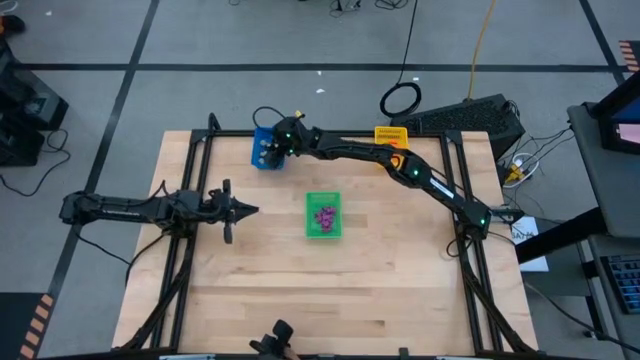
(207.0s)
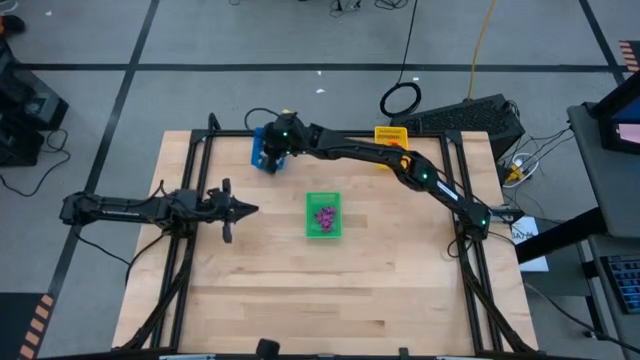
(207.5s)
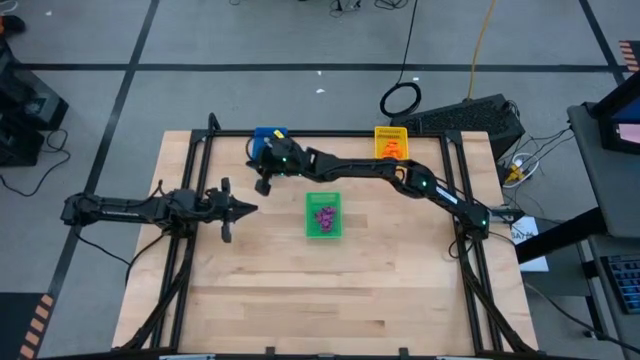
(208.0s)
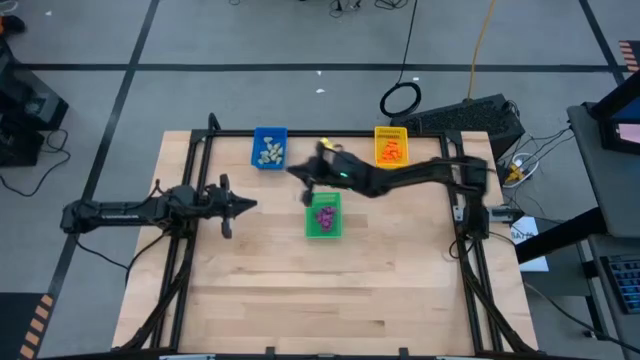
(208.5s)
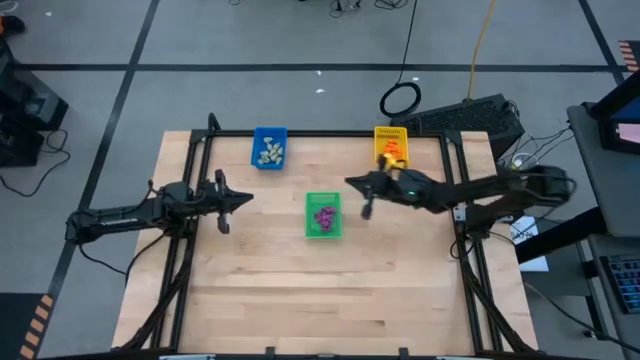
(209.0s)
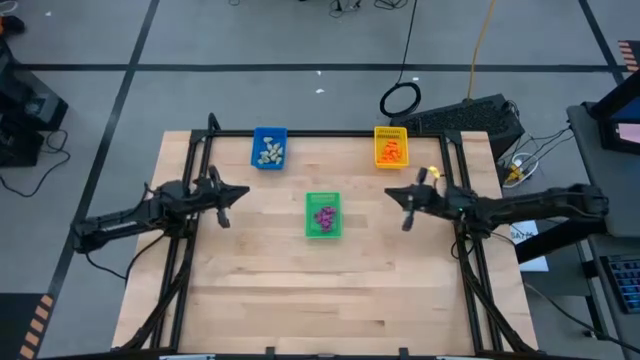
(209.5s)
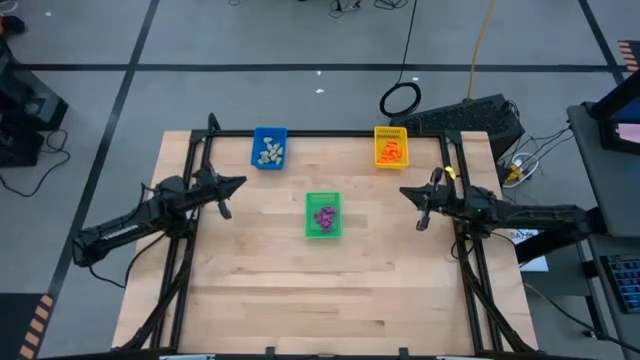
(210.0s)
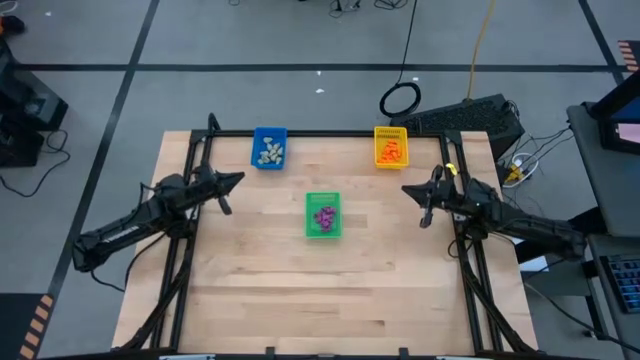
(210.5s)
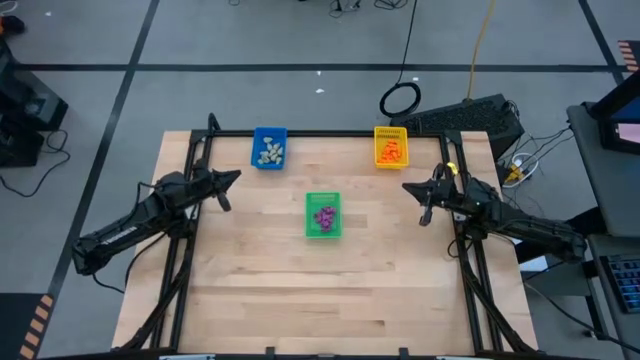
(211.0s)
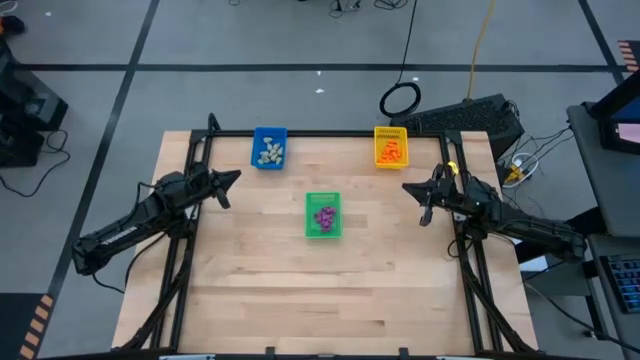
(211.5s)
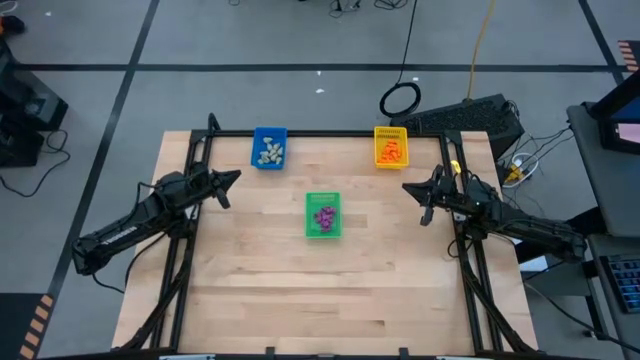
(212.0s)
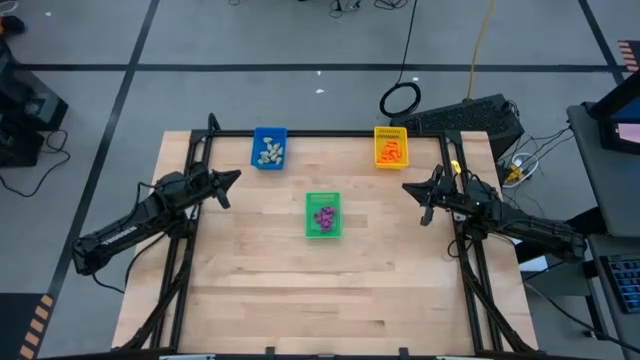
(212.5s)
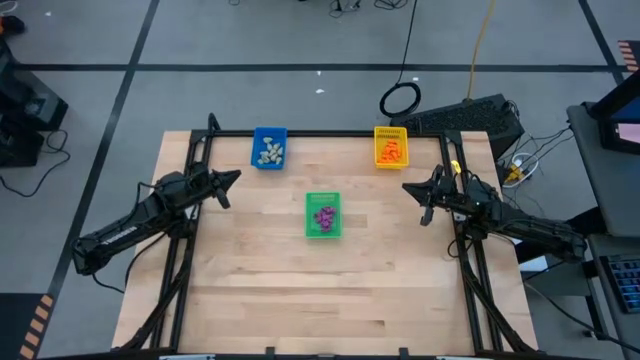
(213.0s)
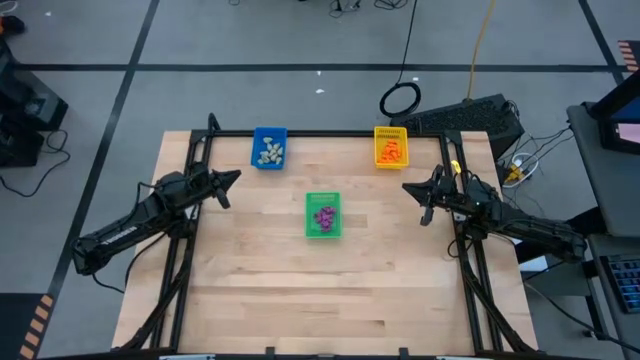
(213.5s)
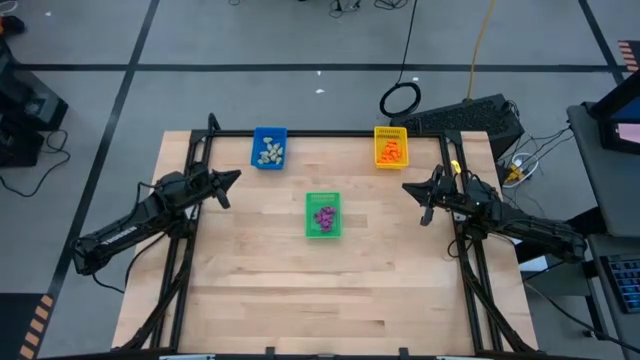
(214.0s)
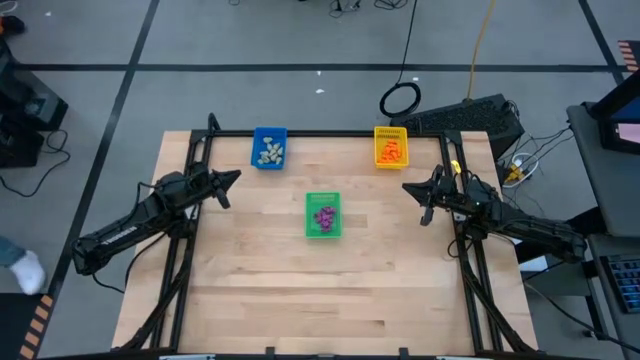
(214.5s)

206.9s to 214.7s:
Task: Sort Halloween decoration
Return to Home Position

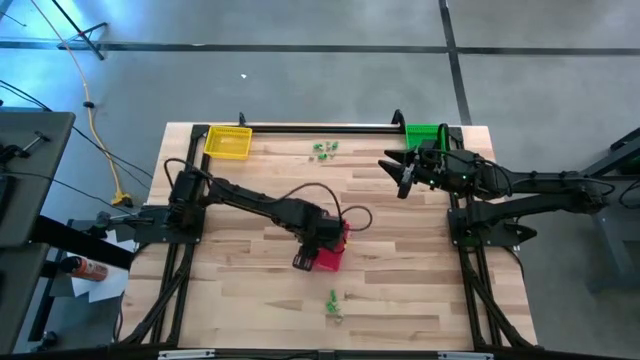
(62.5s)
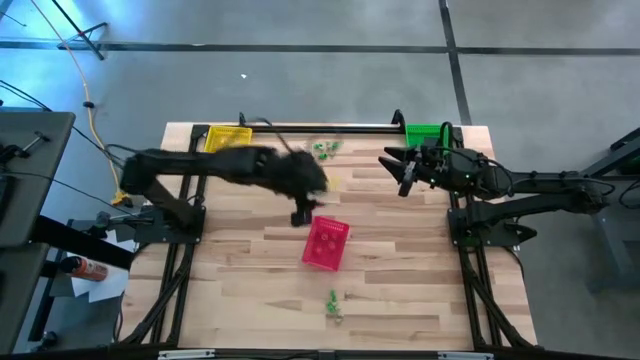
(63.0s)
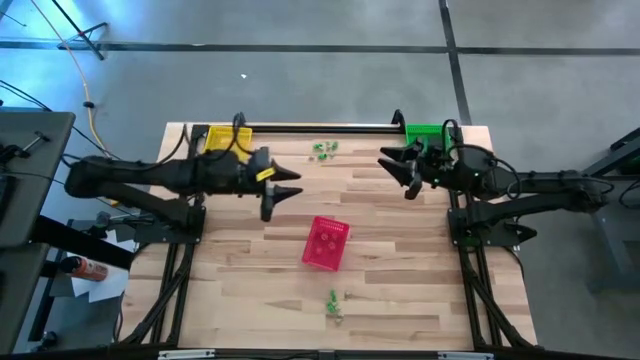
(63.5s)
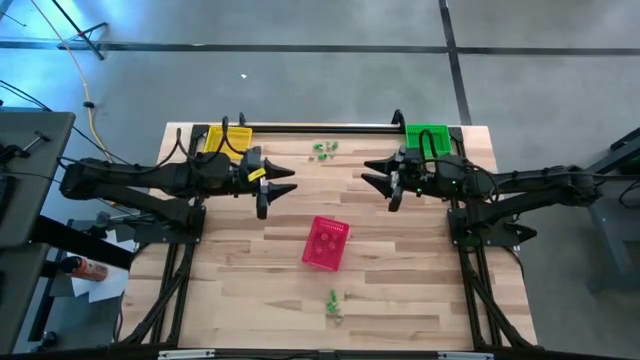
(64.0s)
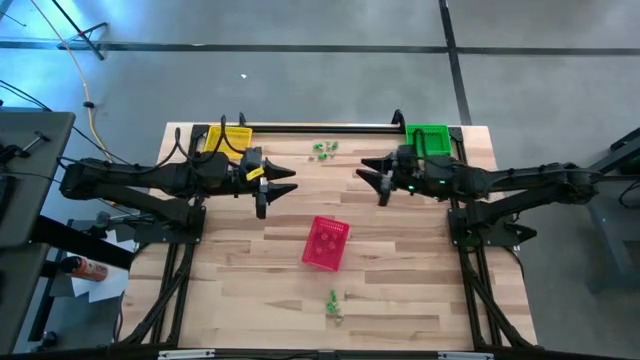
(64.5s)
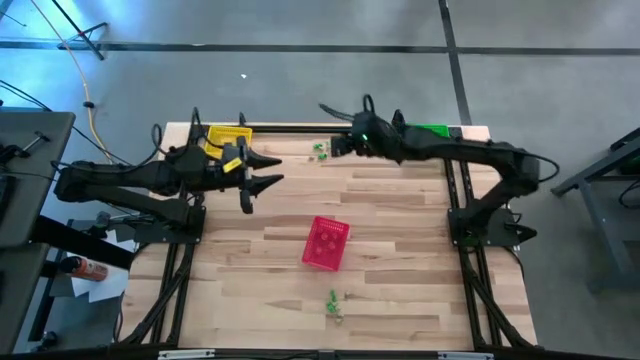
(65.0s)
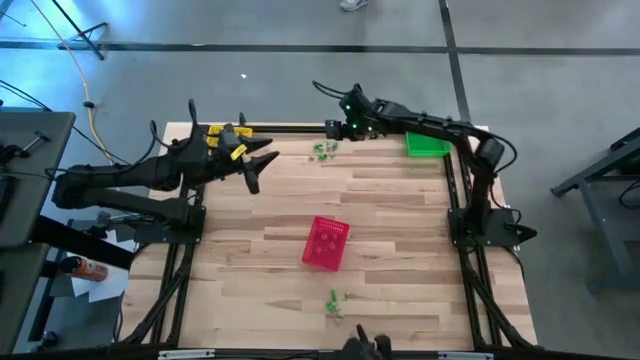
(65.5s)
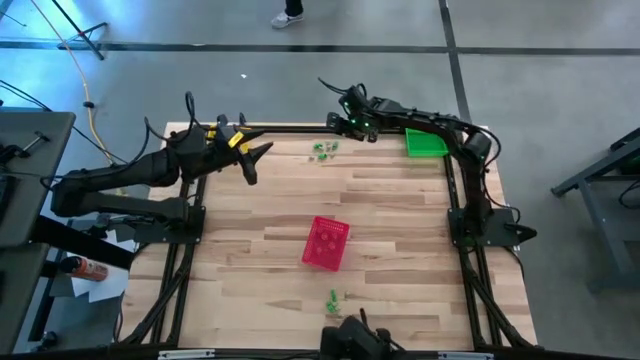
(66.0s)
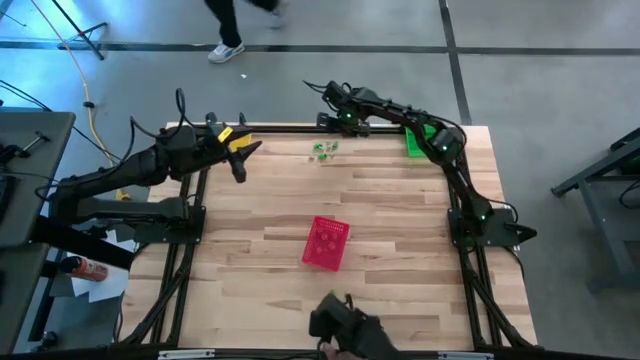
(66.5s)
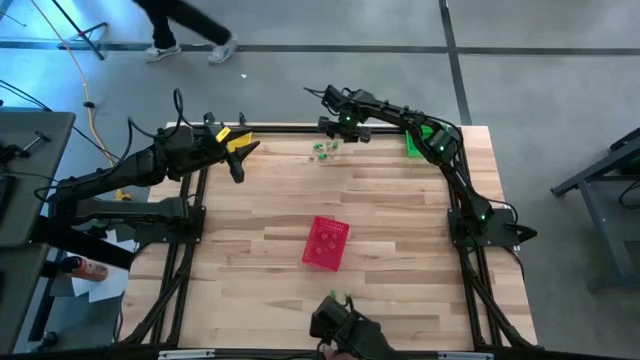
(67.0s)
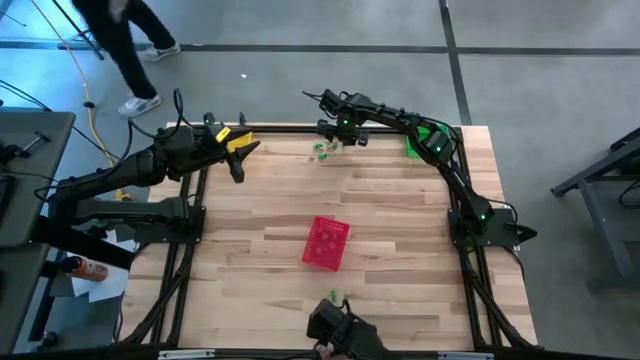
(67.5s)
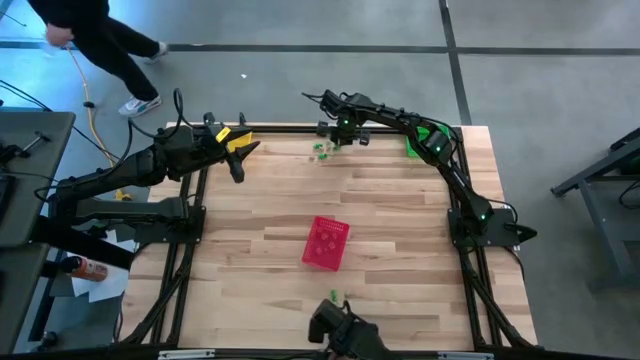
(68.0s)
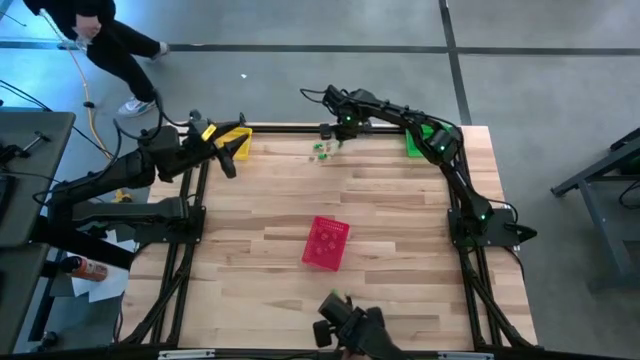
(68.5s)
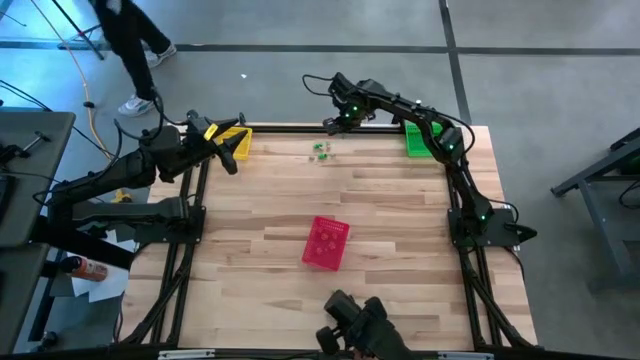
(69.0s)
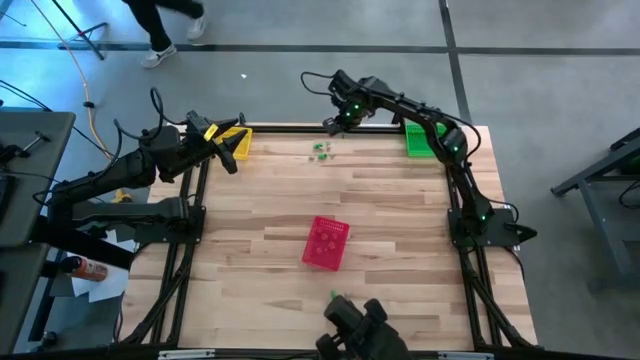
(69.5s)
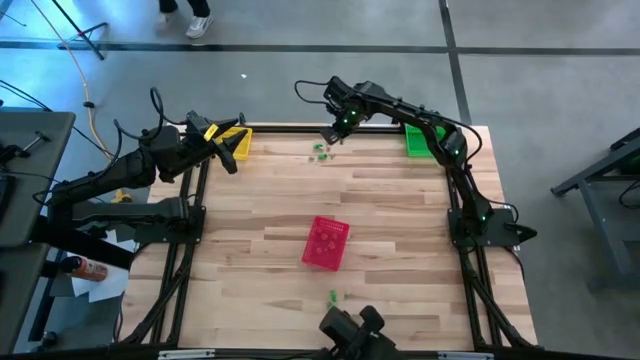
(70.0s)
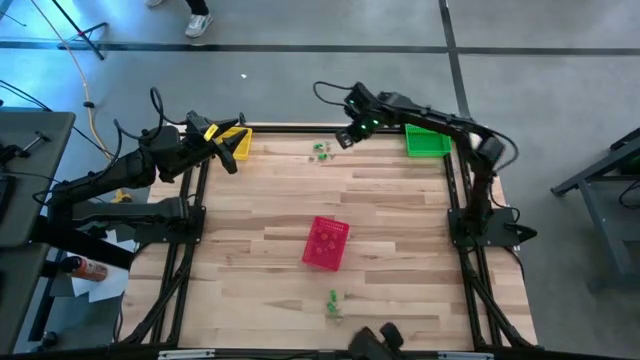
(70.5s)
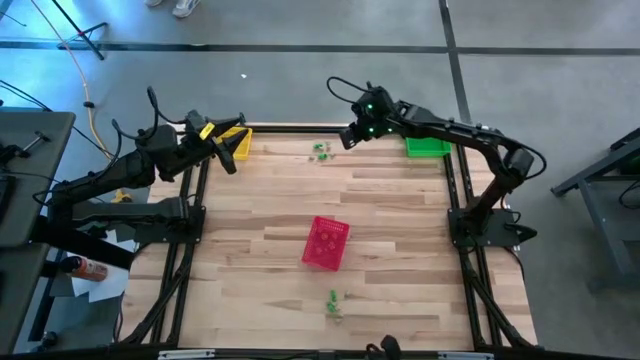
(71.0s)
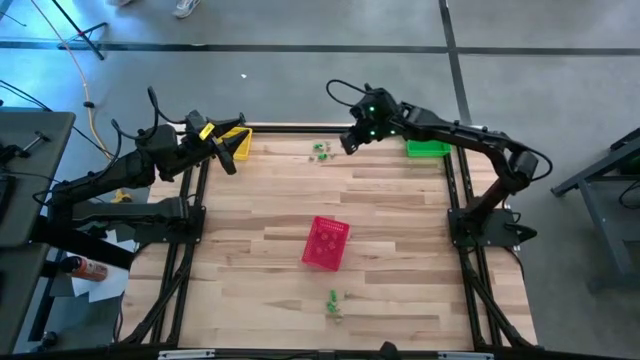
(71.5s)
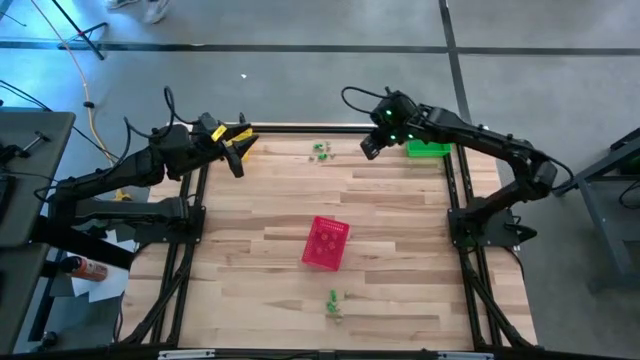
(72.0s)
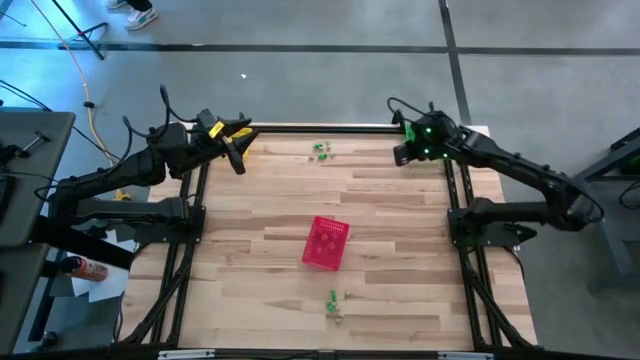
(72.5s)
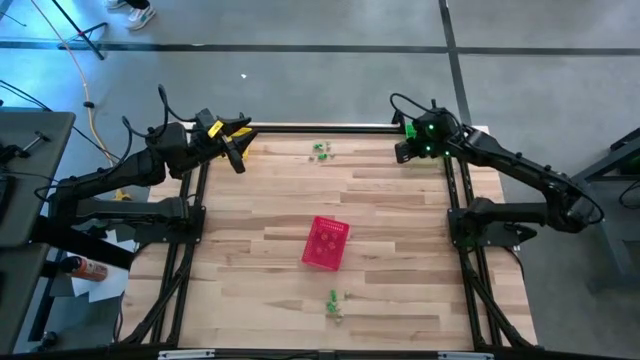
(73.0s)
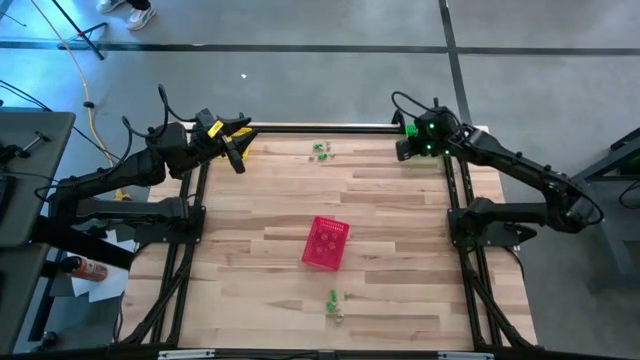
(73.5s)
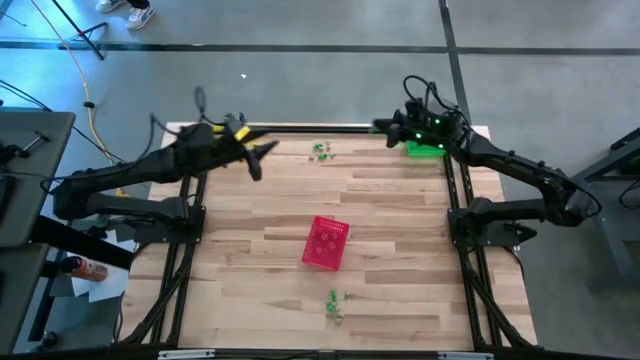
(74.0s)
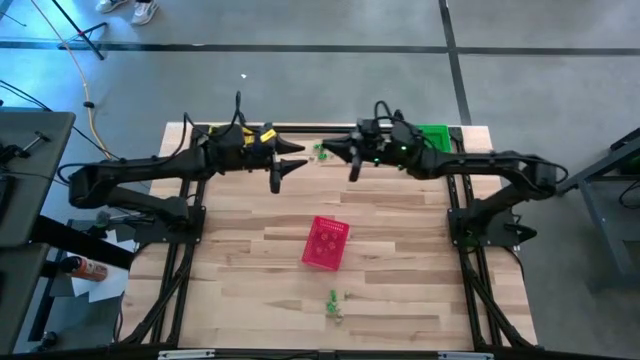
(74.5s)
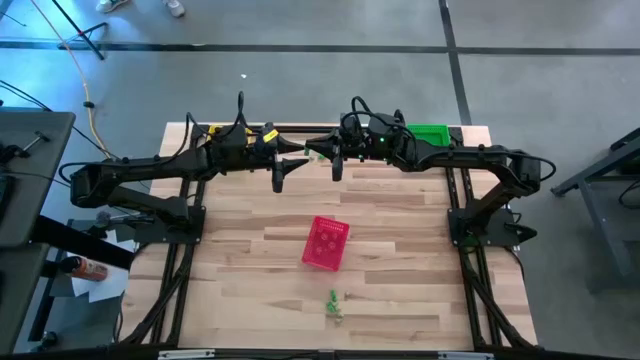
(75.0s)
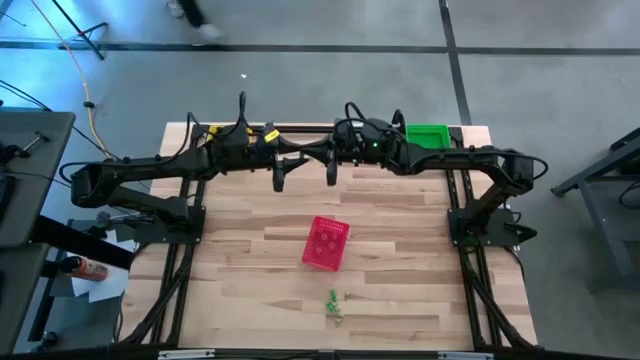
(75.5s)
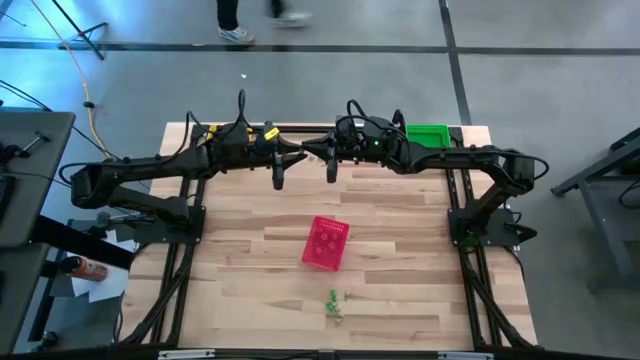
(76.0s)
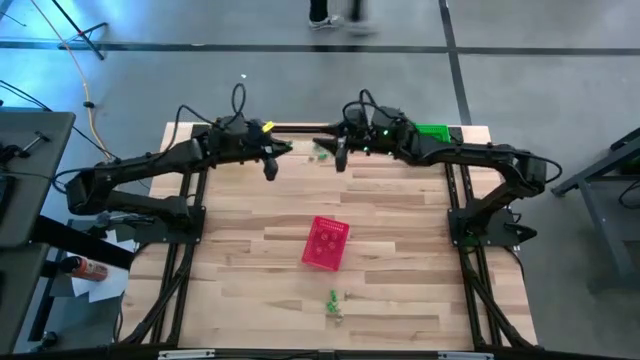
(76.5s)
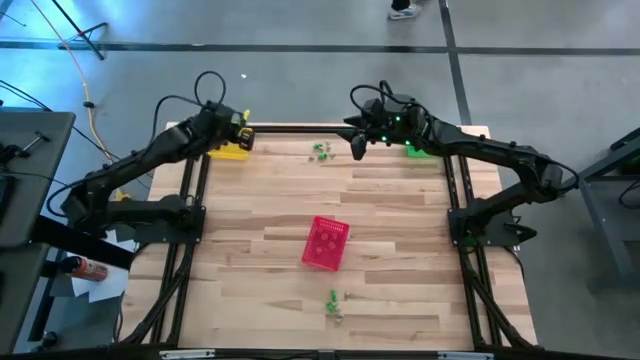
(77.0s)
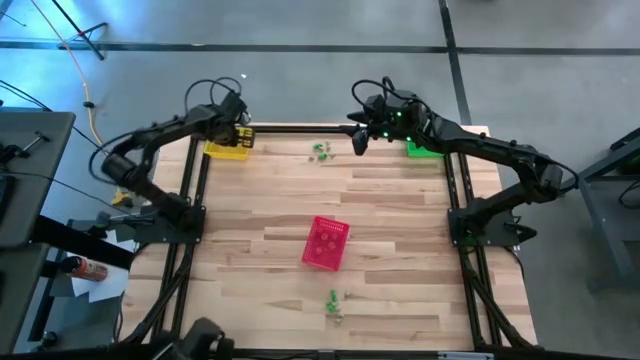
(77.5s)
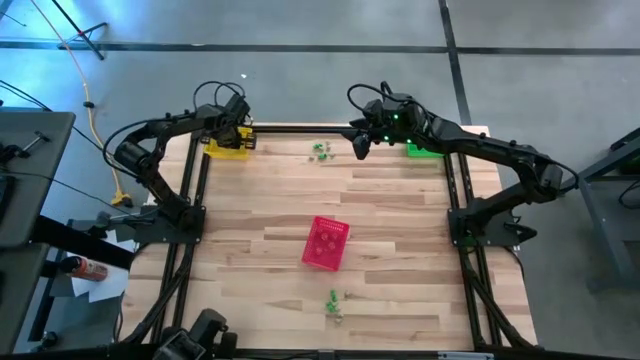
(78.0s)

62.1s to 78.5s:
Task: Sort Halloween decoration
Put the green skeleton toy into the yellow bin
